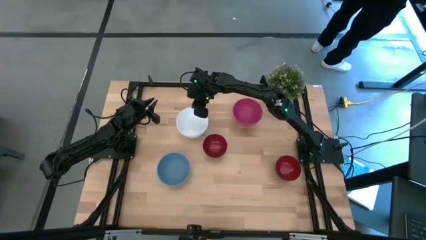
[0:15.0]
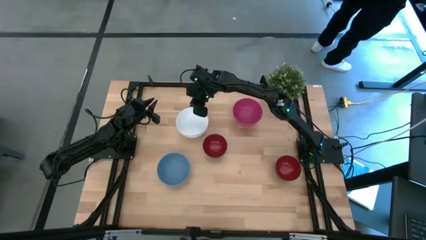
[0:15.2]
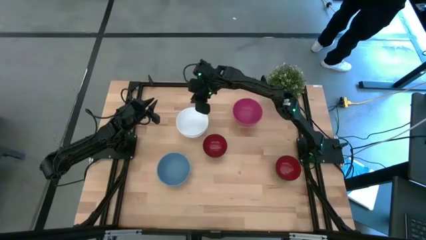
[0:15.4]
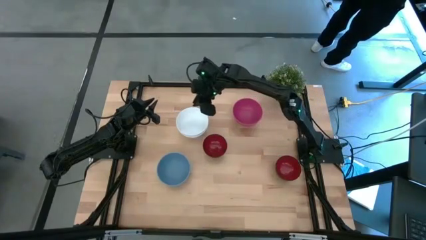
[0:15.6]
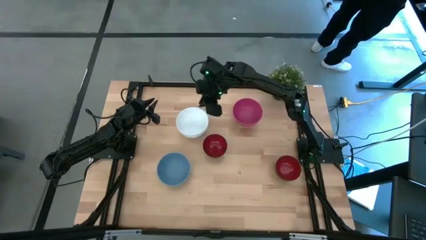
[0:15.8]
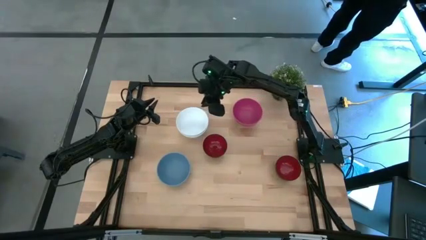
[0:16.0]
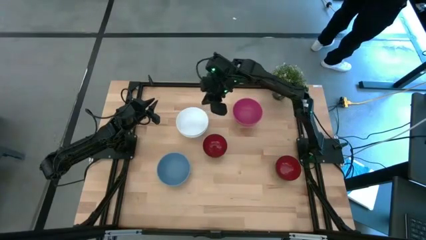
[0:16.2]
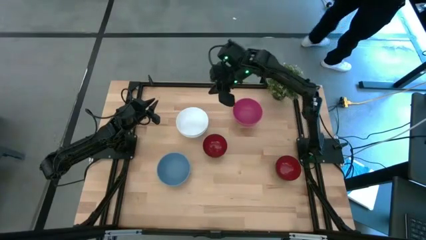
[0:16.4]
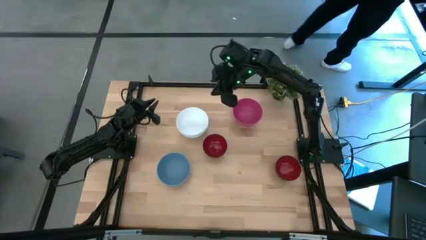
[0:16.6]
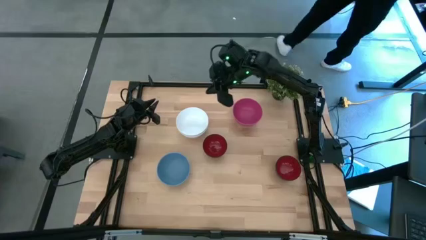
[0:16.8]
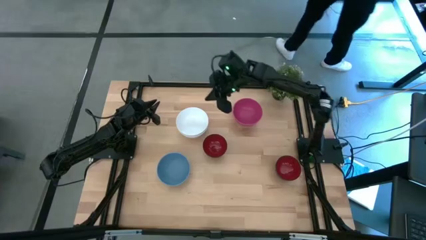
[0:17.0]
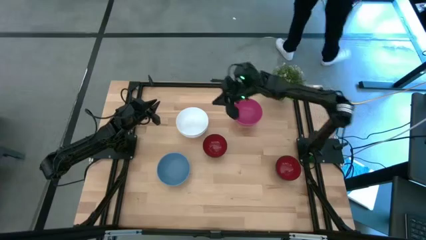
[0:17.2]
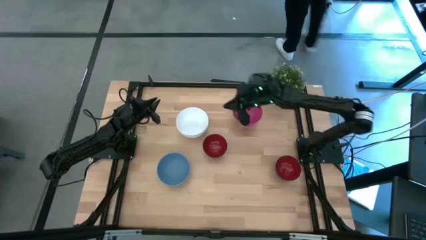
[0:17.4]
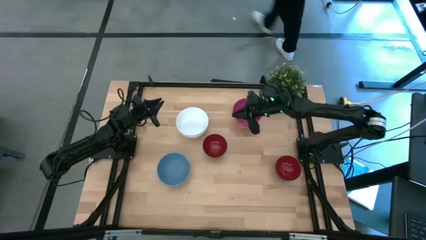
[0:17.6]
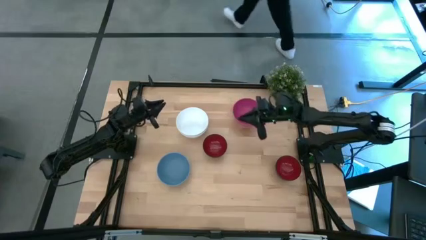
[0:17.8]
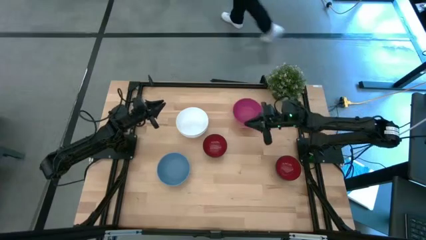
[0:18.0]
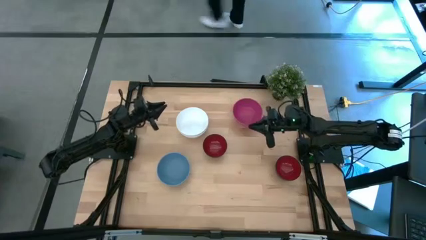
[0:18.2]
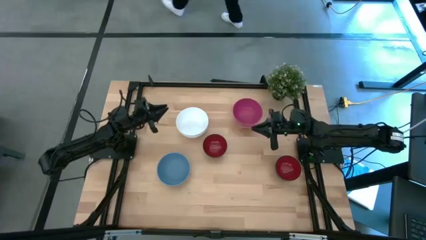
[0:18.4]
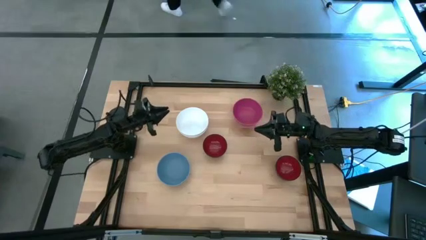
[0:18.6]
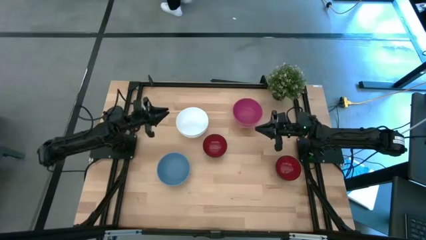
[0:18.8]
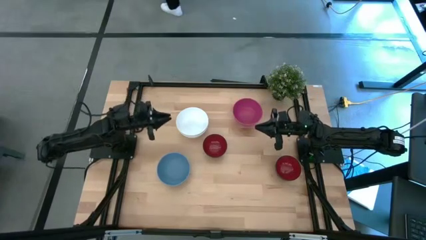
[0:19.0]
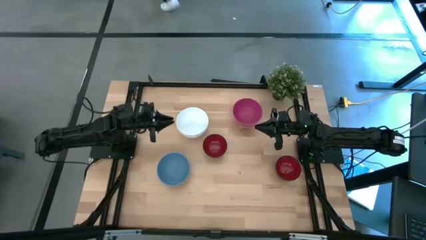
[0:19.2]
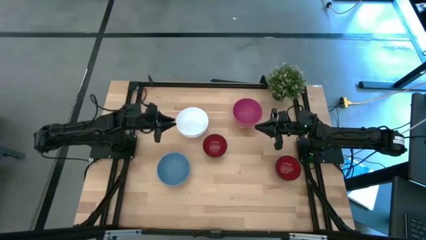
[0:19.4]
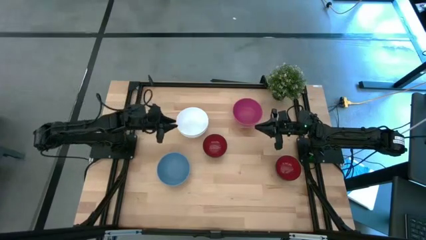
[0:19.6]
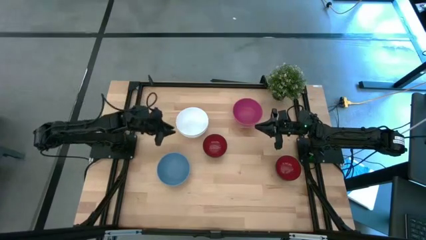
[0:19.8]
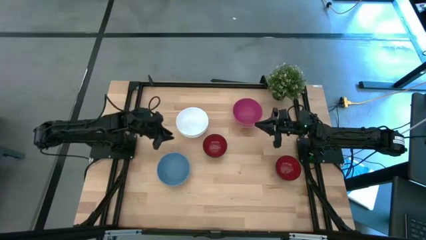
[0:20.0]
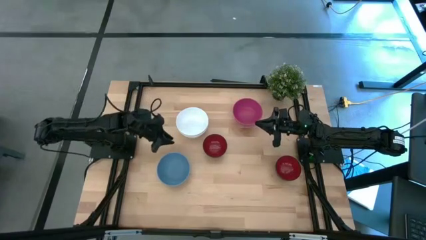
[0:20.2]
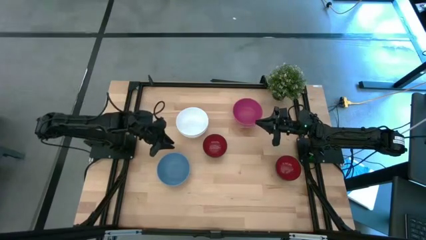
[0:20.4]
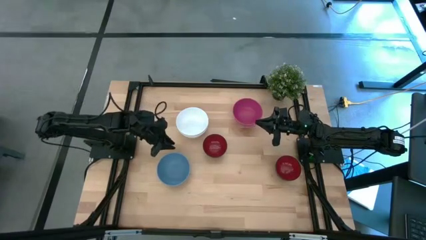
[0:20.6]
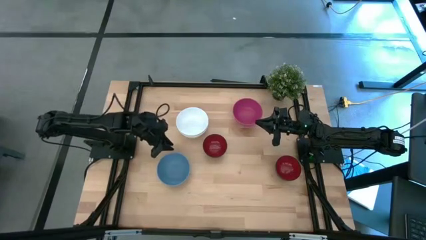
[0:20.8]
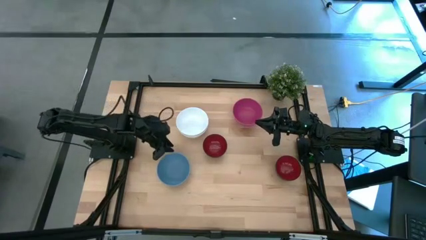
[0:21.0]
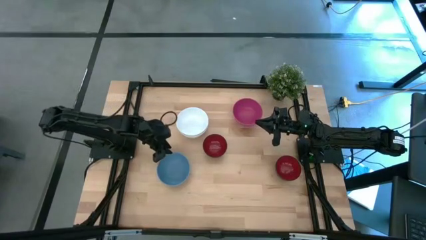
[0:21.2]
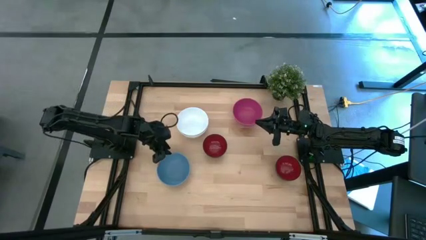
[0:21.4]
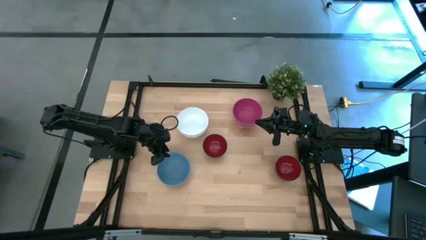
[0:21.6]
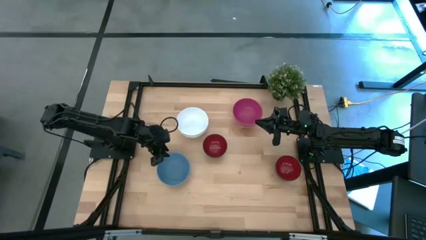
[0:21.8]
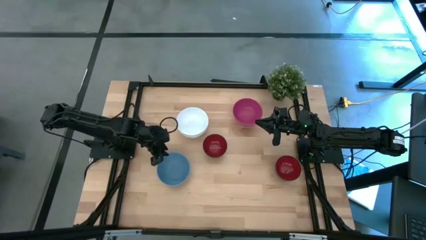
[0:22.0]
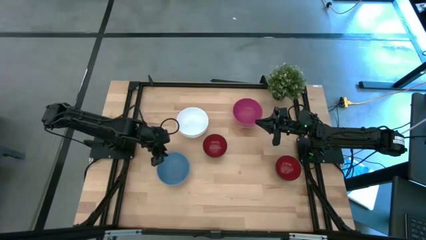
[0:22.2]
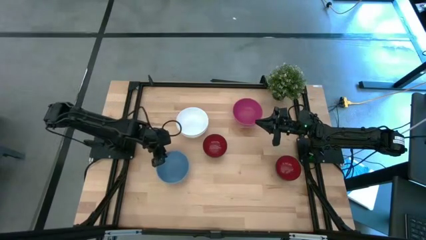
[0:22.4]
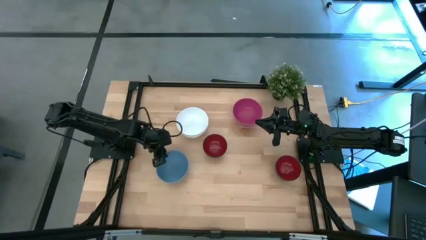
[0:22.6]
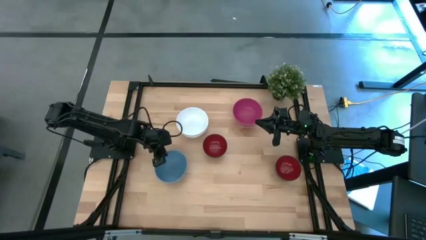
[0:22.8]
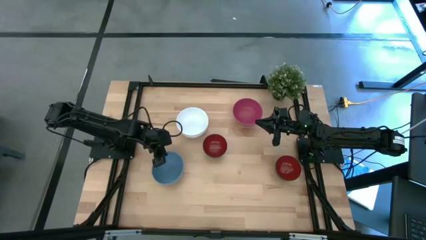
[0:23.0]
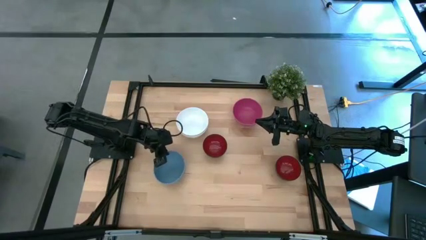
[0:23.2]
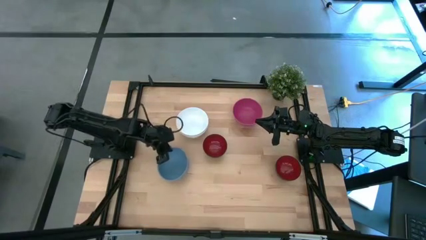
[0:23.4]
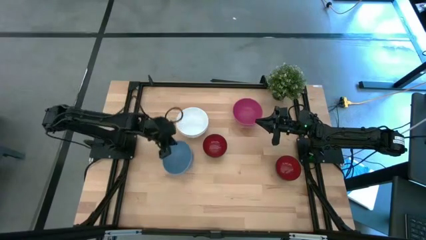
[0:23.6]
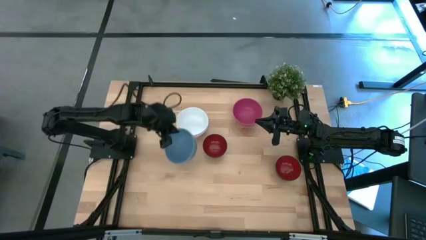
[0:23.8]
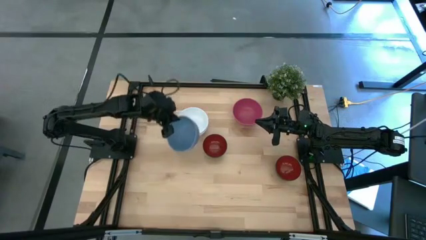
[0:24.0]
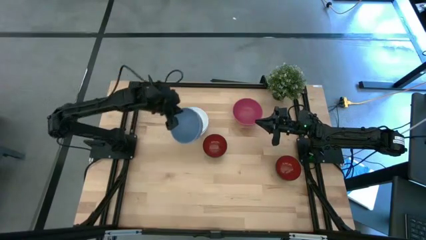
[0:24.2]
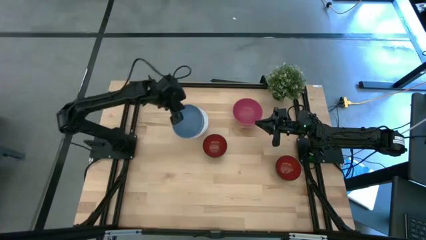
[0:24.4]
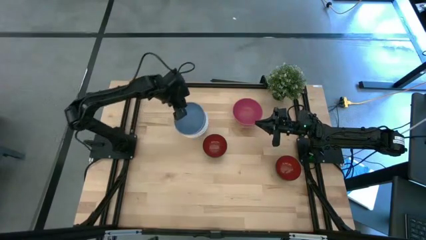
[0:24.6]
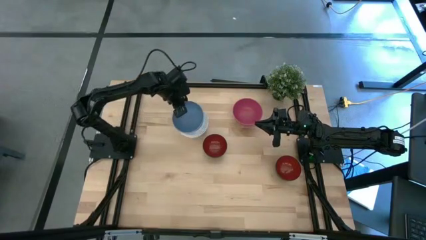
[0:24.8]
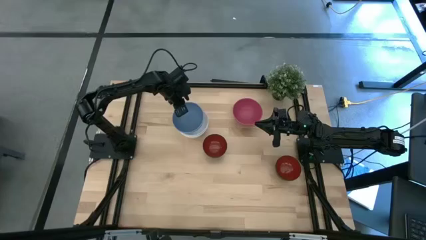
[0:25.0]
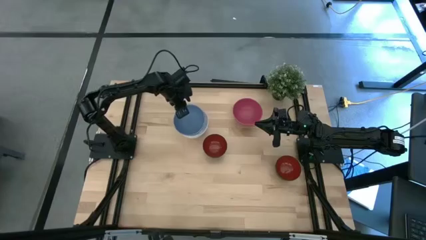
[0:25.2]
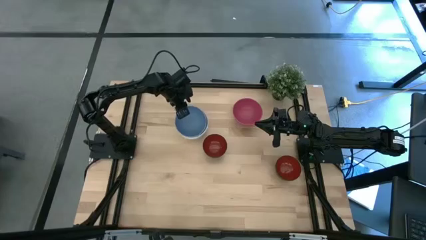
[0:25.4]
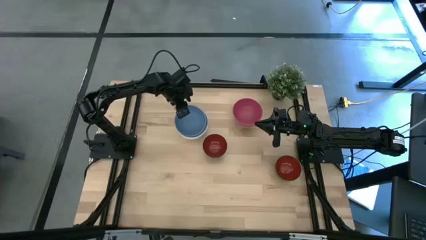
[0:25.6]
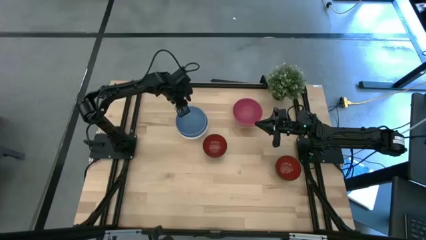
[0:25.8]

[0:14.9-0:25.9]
Task: Nest bowls inside each other
Stack the blue bowl into the white bowl

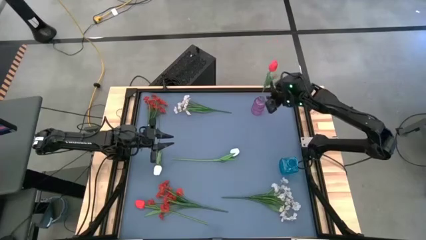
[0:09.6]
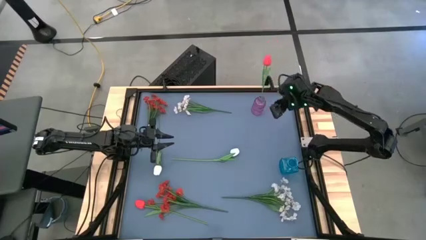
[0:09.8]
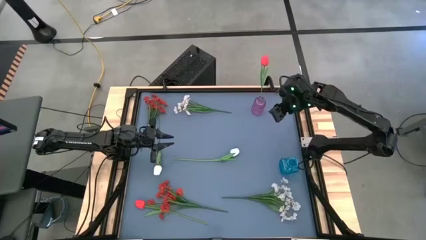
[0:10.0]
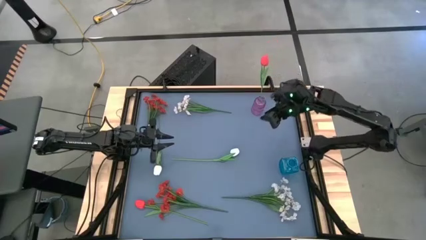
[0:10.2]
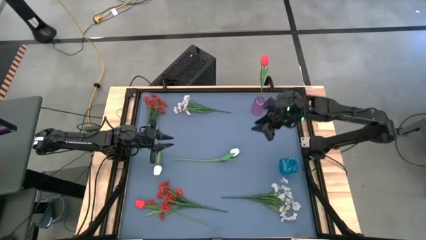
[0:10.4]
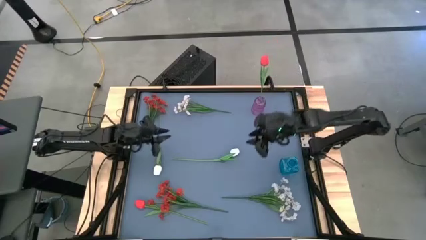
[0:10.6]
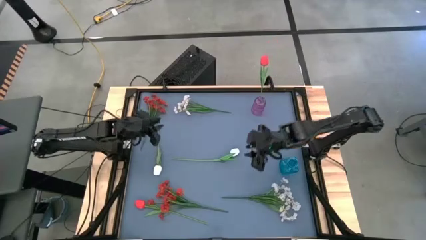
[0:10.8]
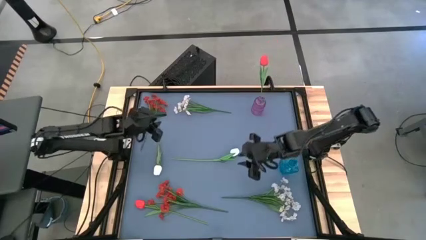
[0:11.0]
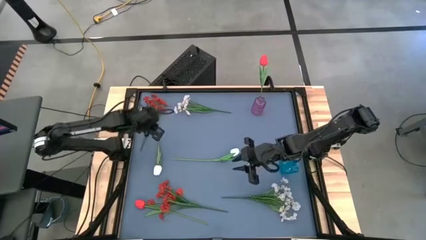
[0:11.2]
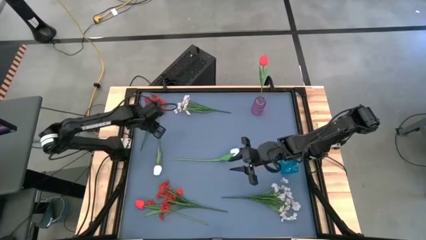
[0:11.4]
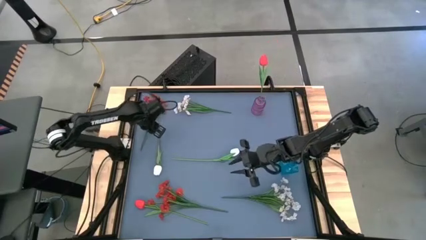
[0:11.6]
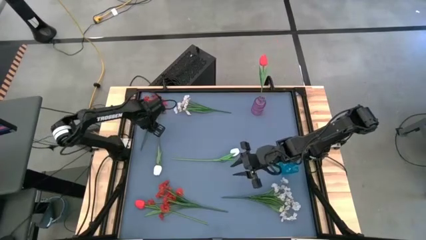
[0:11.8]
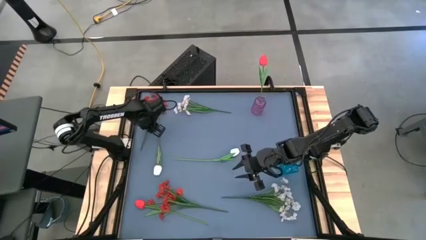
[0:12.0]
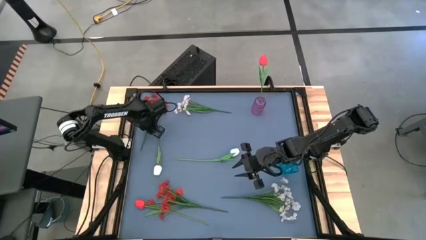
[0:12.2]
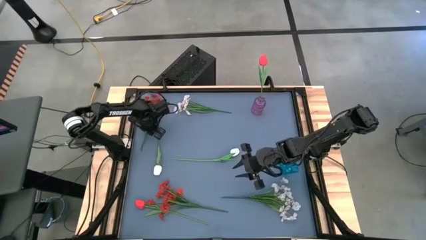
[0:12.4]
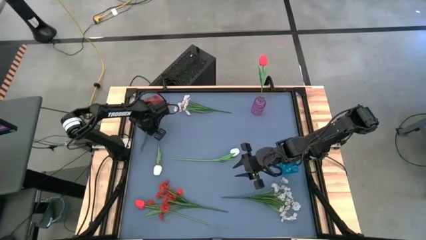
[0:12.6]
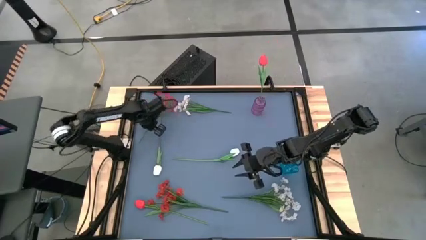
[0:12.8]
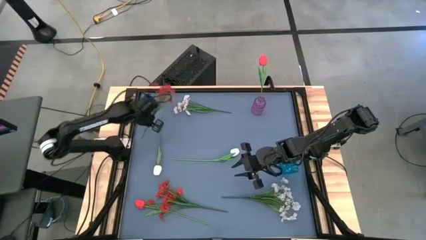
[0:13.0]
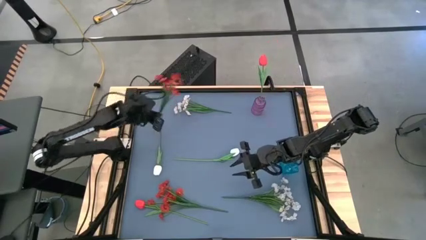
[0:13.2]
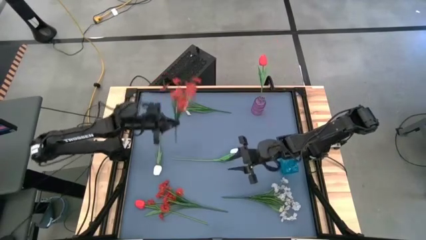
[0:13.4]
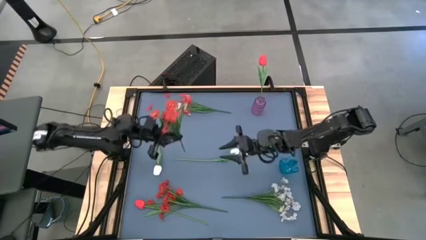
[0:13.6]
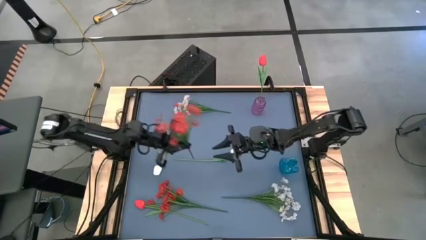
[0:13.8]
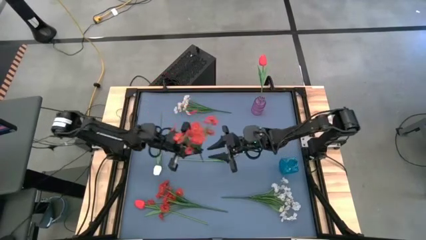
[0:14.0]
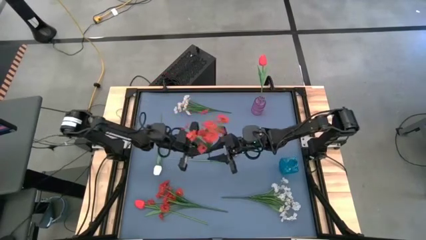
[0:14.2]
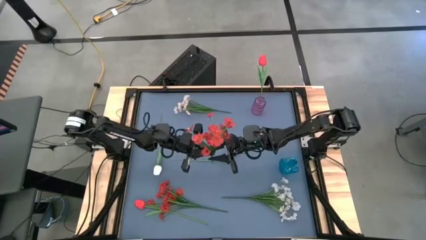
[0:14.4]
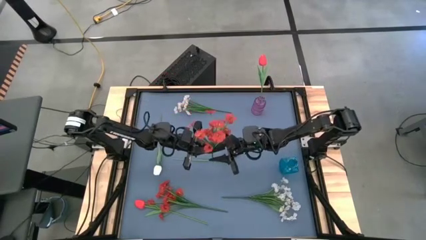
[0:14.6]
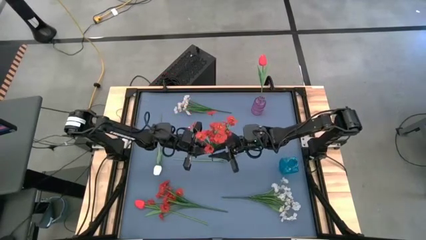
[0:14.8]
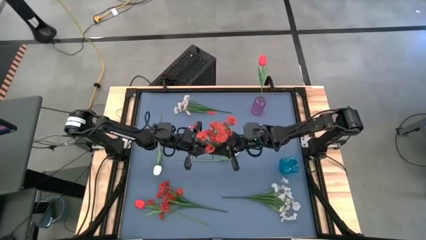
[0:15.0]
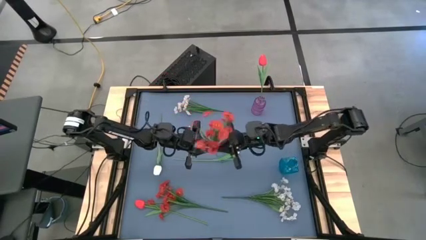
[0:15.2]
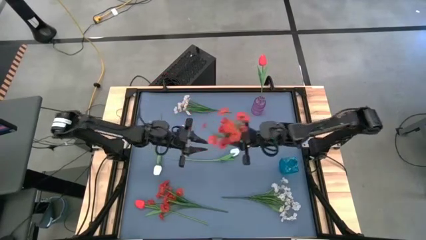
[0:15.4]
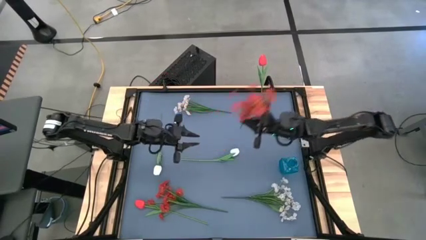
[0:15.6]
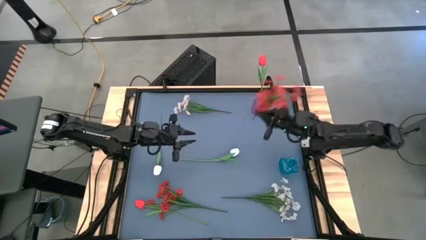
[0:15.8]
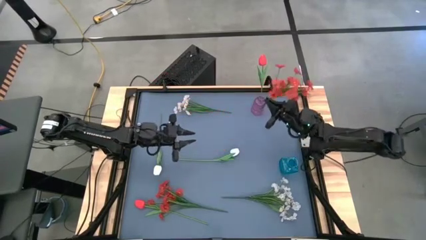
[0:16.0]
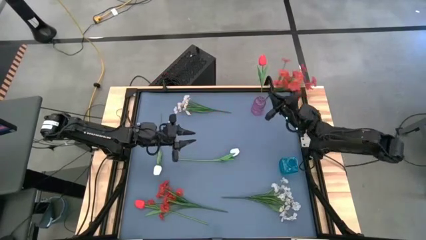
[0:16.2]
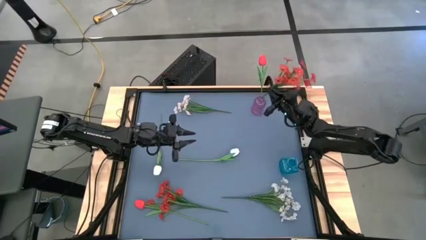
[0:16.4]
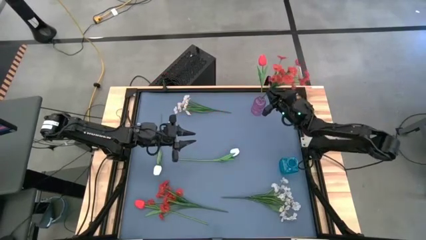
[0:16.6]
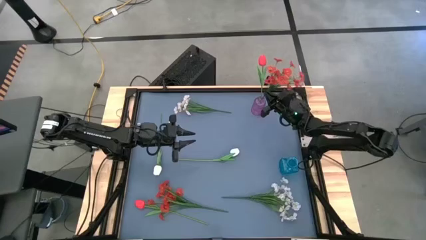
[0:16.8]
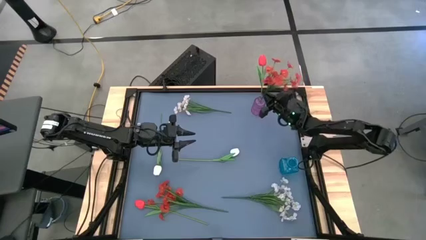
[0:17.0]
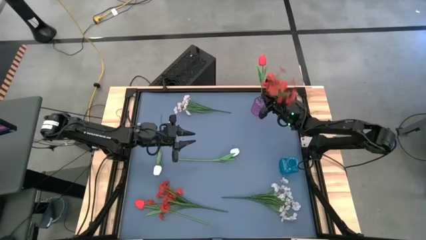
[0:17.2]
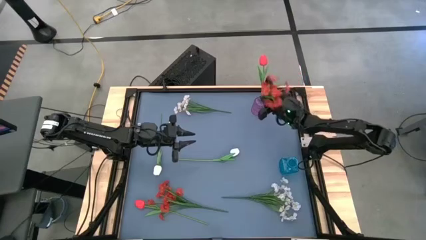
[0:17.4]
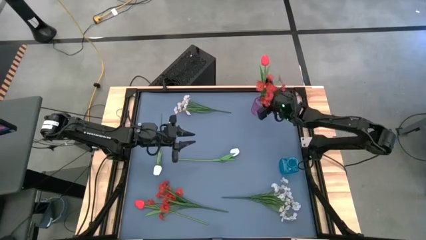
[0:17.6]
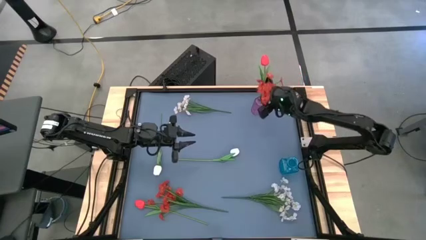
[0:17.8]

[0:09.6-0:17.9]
Task: Sort flowers into vase by color
Put the top red flower into the purple vase
